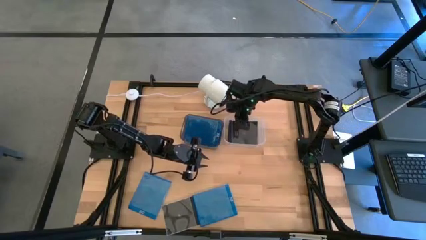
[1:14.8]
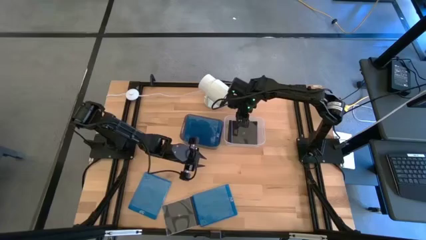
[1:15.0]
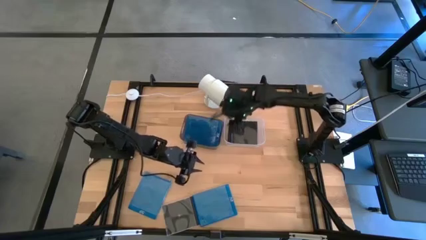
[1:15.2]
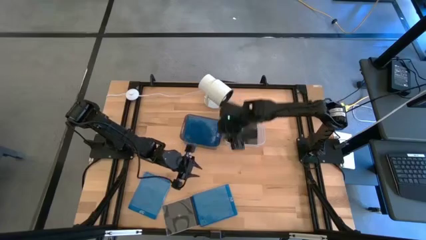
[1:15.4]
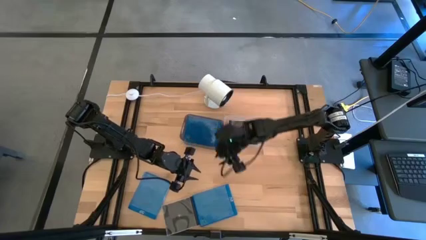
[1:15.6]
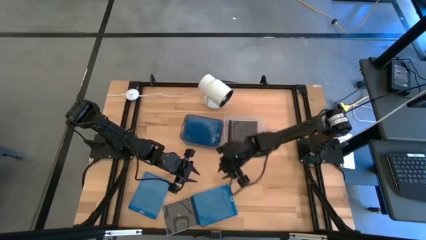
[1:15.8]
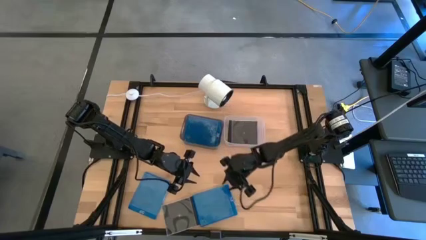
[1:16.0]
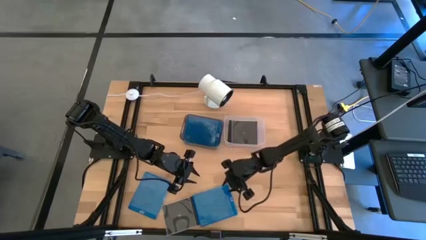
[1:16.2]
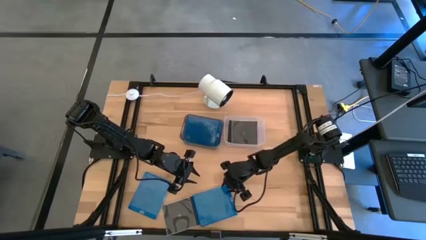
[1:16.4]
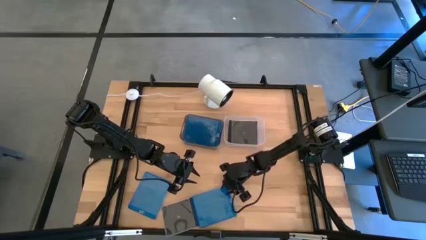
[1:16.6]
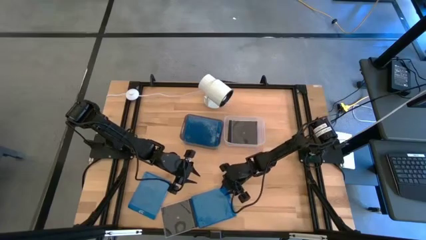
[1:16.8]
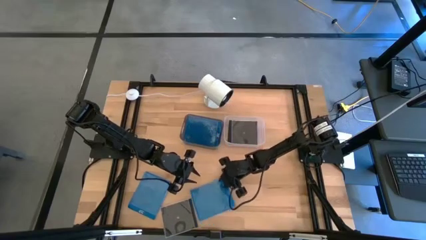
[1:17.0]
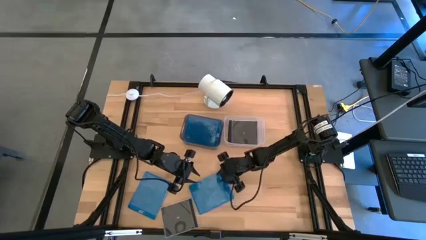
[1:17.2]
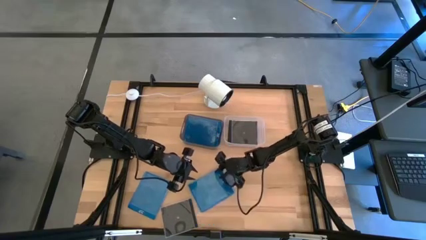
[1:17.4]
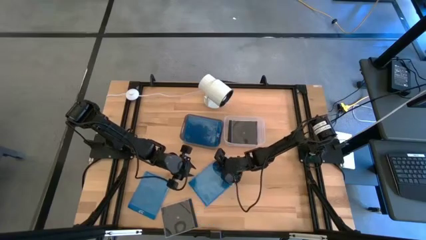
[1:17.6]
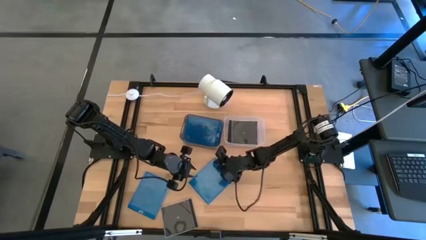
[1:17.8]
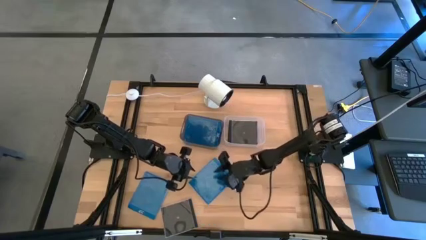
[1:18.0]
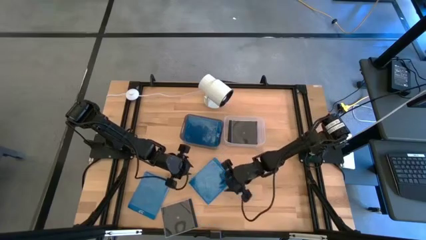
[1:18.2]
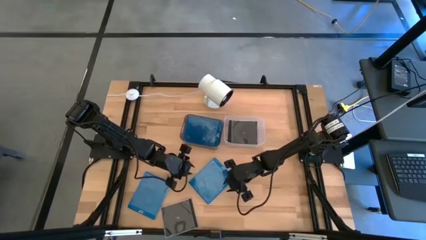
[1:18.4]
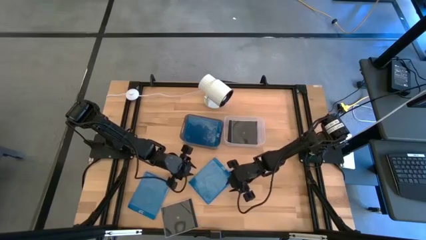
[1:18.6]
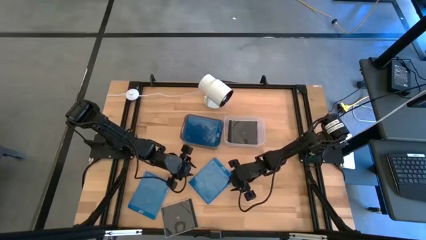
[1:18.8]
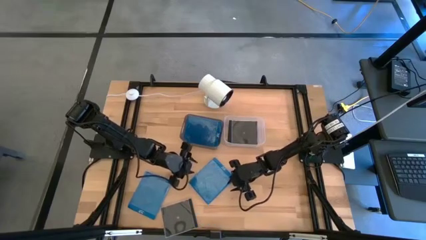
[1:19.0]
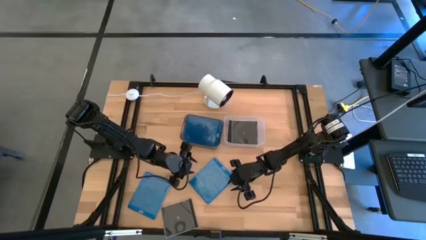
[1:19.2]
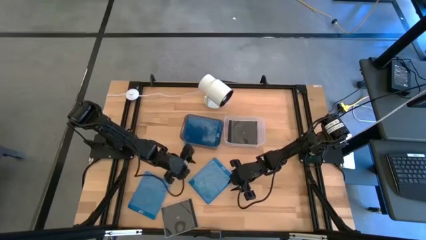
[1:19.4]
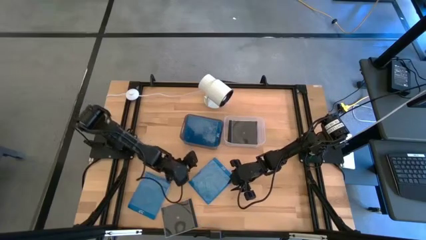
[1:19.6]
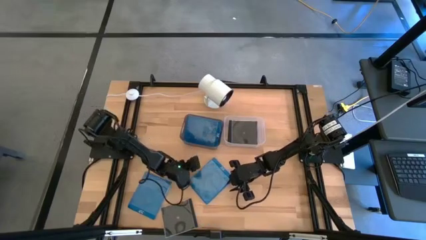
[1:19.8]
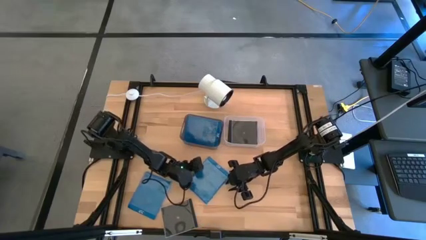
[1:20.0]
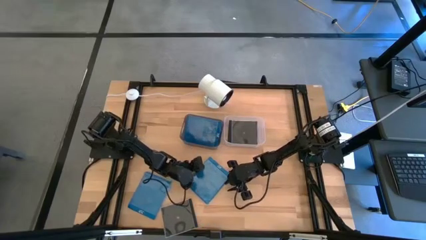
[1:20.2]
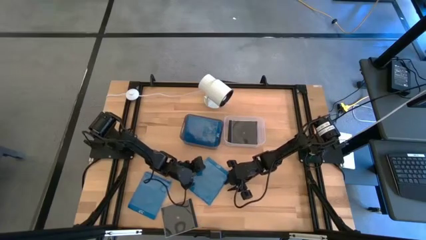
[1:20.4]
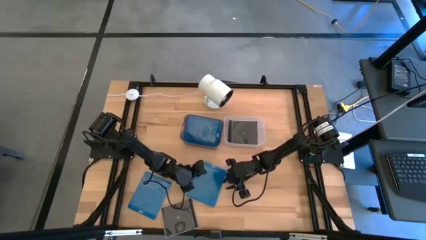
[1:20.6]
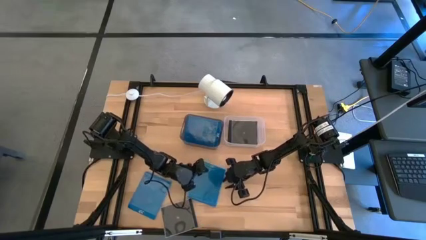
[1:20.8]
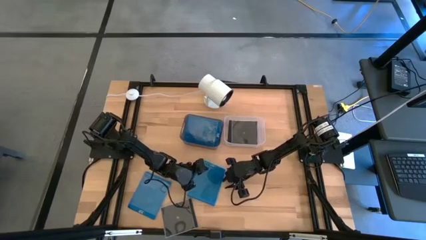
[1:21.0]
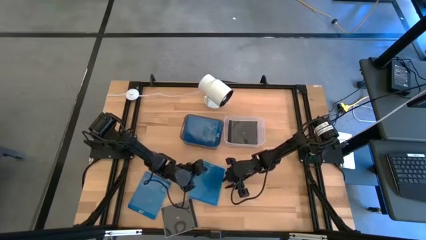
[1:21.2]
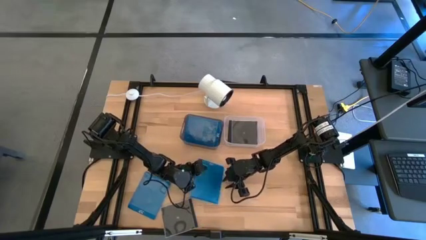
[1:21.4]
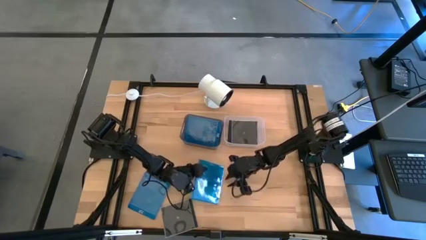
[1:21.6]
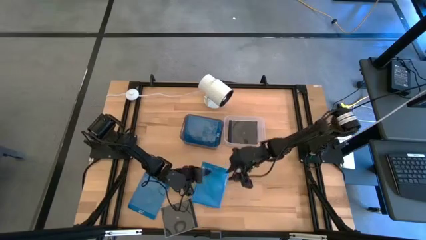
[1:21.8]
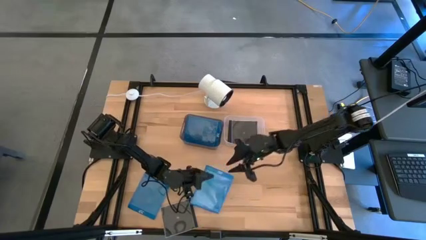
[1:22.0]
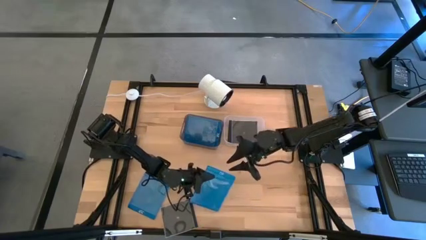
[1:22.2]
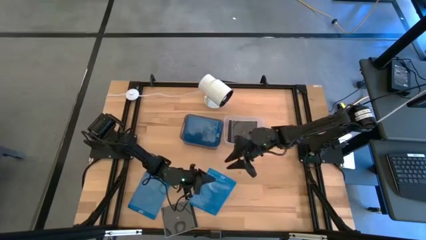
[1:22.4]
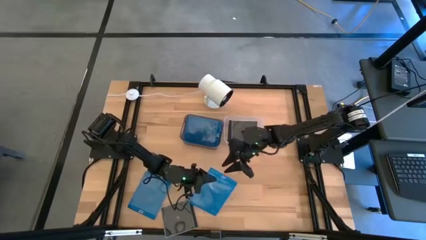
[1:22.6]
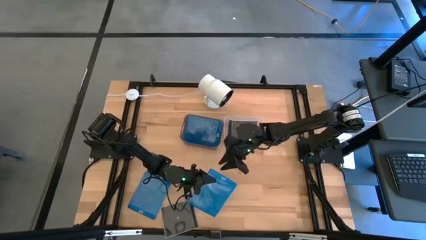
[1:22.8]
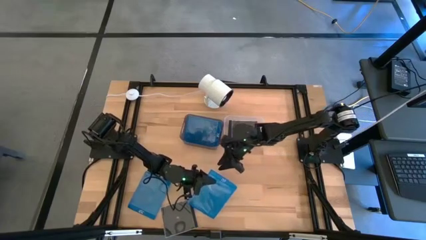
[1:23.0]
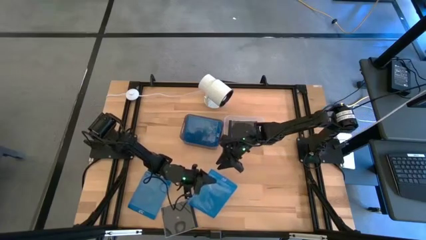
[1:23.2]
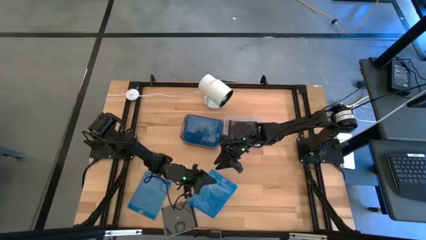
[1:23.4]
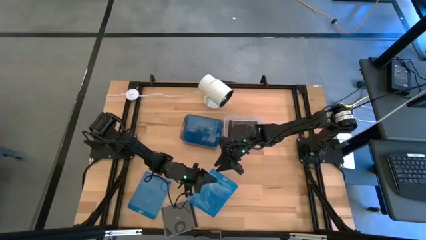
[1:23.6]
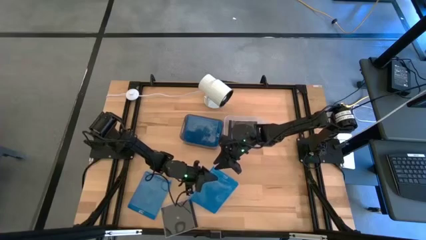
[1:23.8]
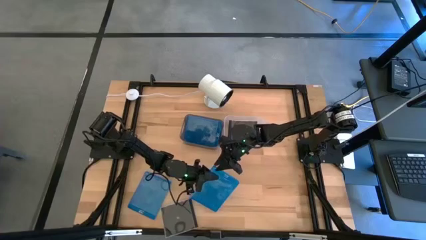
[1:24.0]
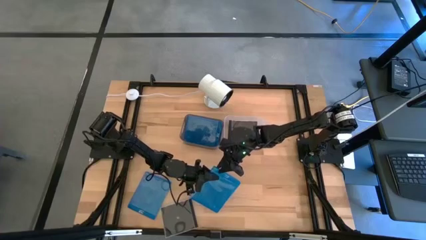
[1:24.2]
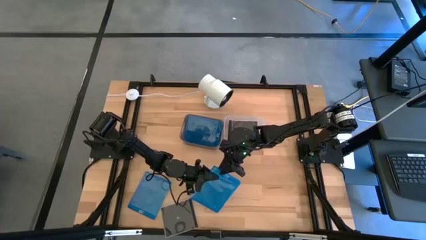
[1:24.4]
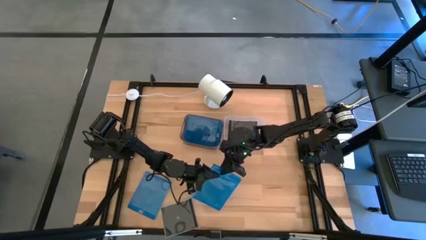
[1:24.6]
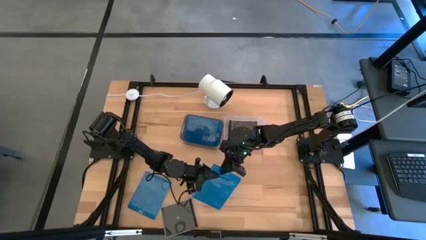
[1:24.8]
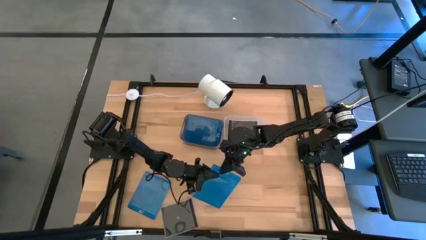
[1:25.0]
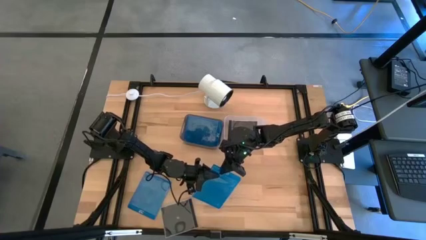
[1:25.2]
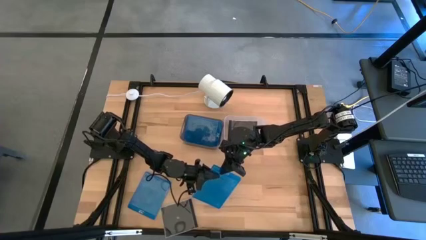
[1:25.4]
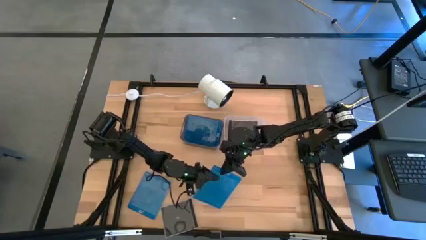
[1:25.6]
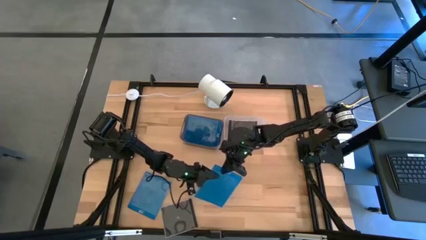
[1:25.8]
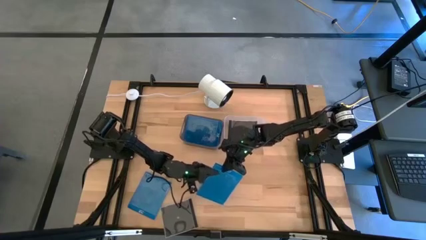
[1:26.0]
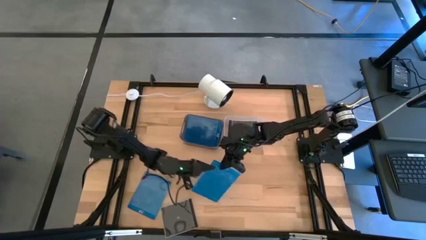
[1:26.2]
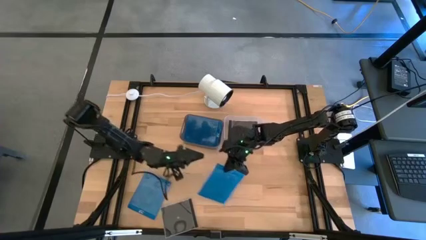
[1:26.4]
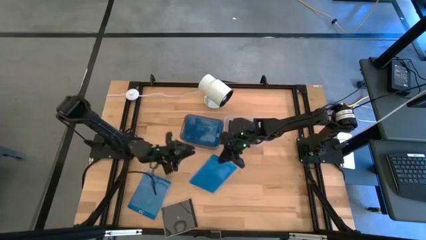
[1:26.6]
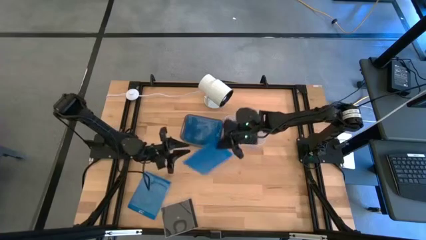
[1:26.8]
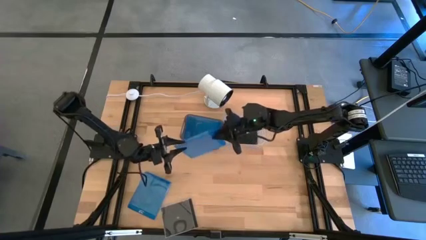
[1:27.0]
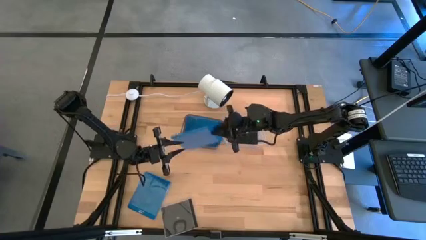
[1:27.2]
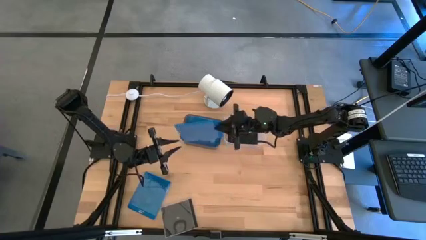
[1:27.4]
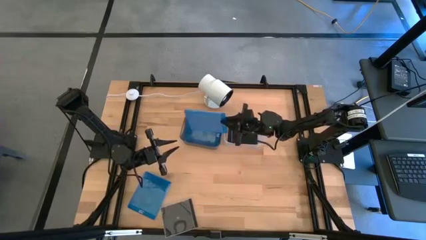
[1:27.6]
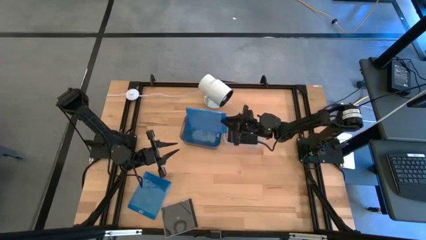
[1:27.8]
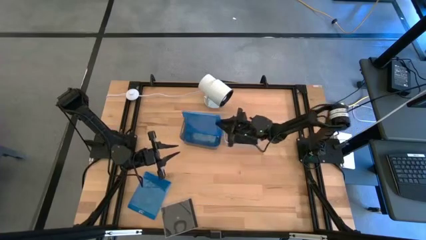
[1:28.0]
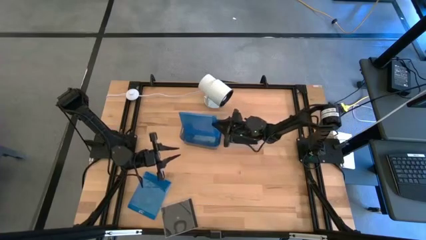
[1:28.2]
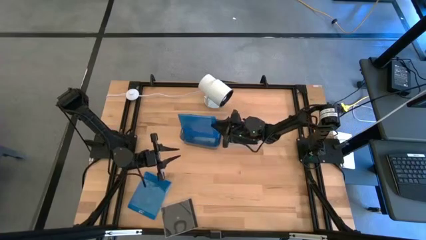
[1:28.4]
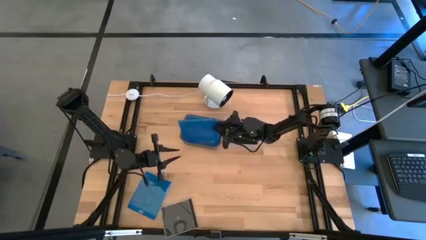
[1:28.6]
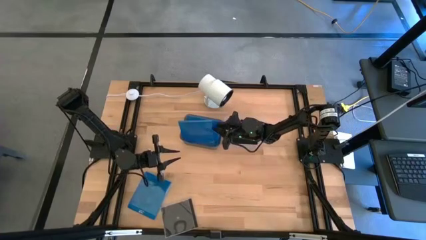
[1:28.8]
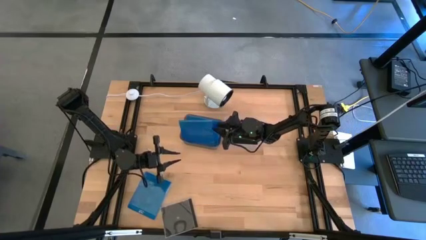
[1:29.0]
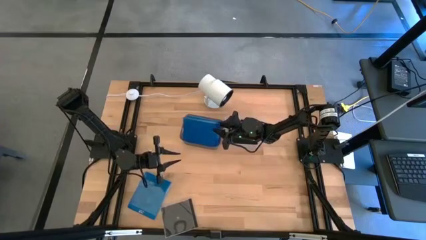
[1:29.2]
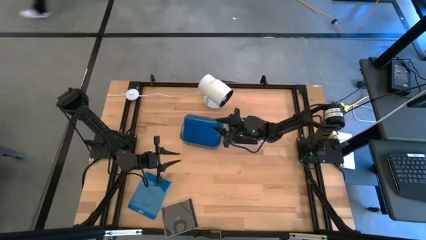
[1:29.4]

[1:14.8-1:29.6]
Task: Pick & place jewel cases by type
Put the right blue cd case into the black bin
